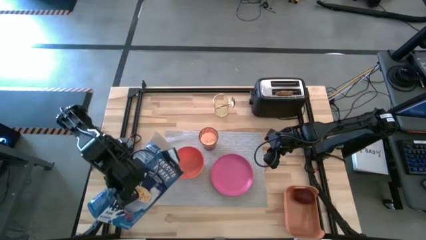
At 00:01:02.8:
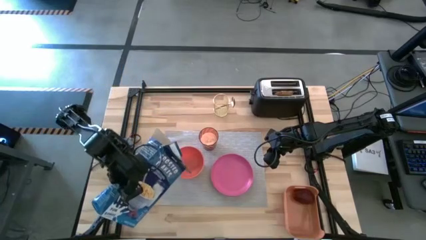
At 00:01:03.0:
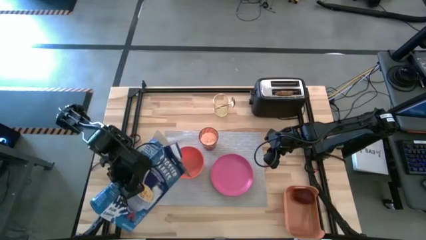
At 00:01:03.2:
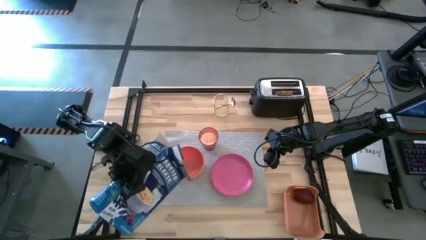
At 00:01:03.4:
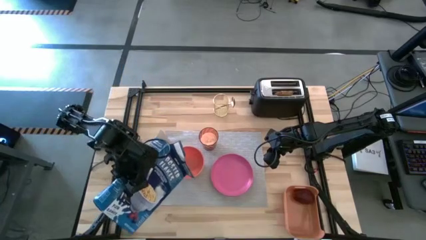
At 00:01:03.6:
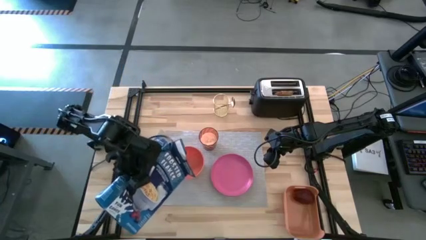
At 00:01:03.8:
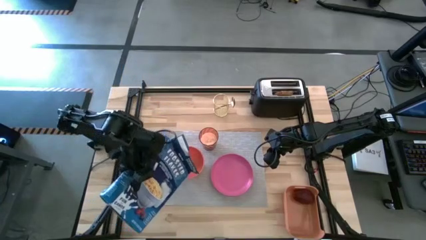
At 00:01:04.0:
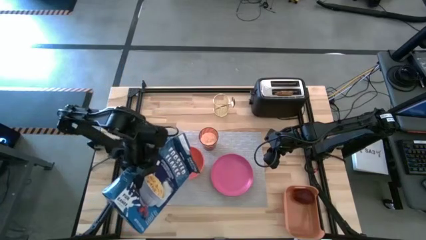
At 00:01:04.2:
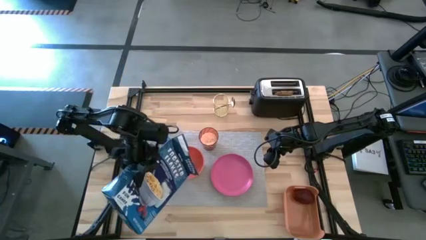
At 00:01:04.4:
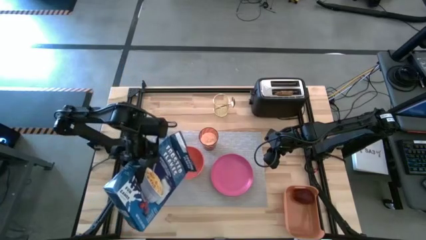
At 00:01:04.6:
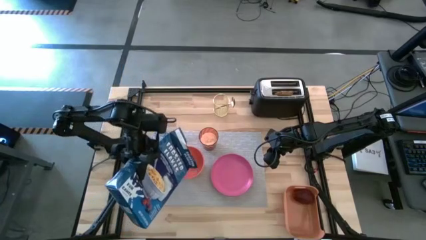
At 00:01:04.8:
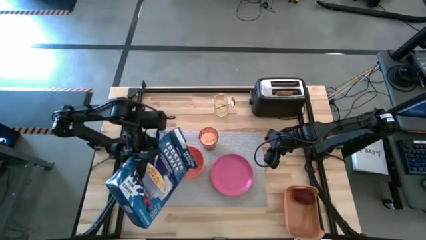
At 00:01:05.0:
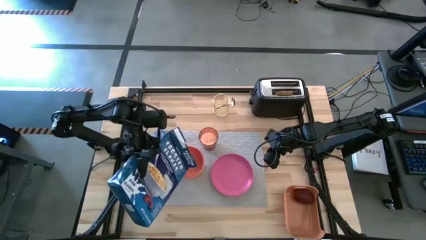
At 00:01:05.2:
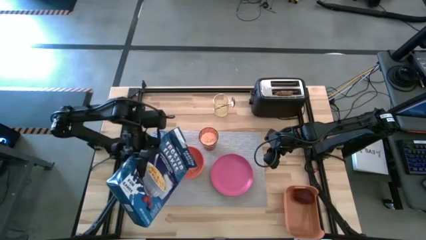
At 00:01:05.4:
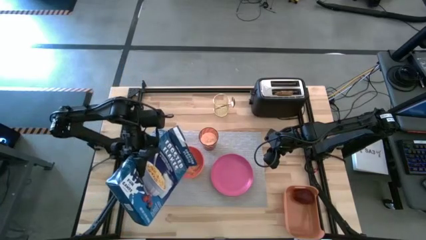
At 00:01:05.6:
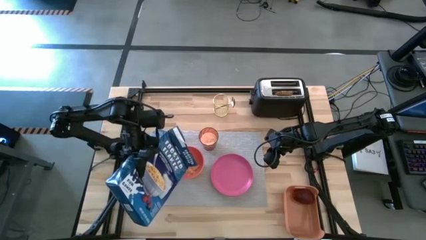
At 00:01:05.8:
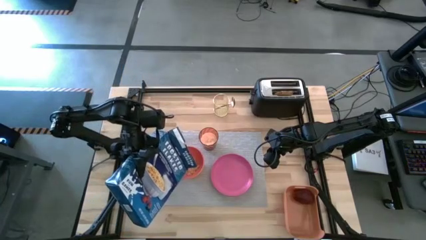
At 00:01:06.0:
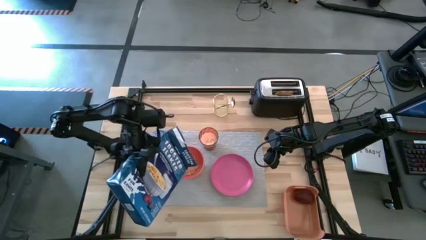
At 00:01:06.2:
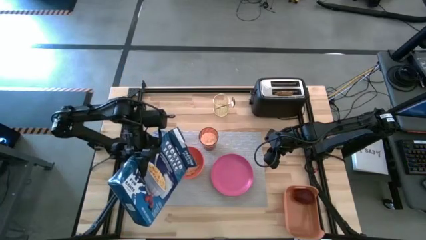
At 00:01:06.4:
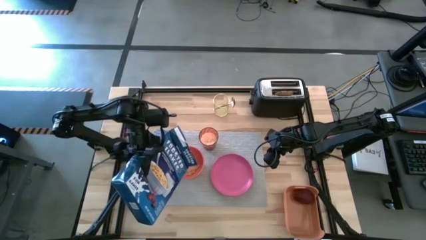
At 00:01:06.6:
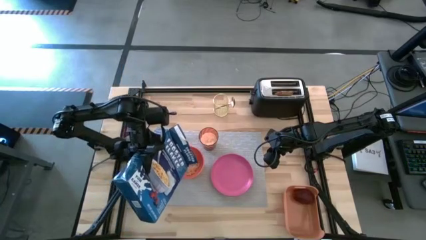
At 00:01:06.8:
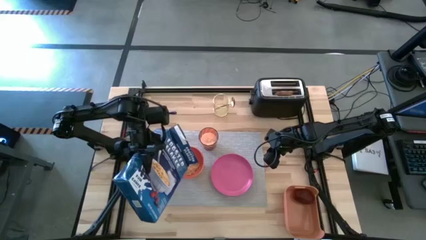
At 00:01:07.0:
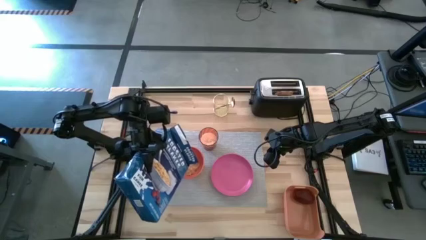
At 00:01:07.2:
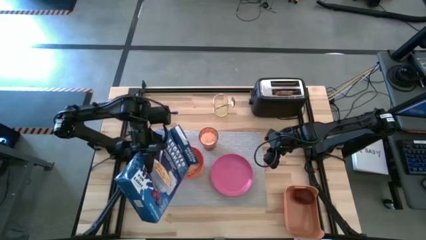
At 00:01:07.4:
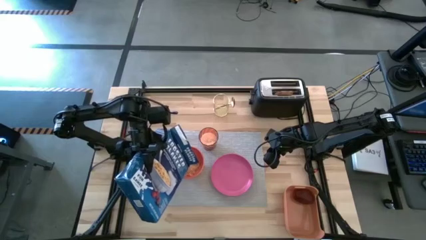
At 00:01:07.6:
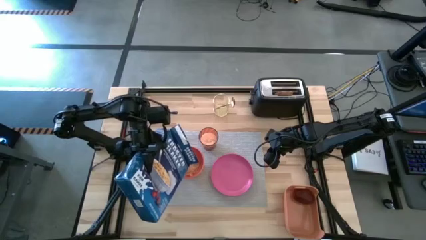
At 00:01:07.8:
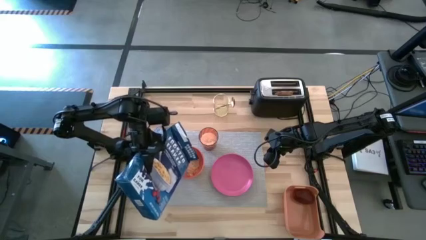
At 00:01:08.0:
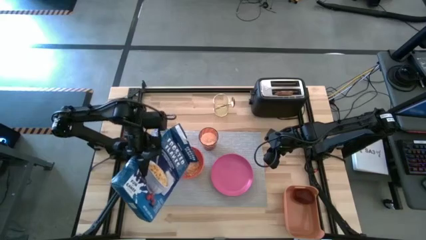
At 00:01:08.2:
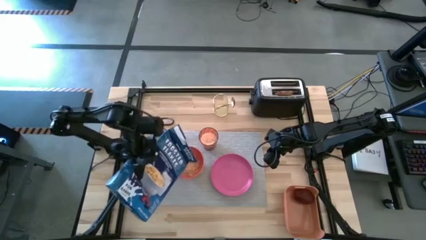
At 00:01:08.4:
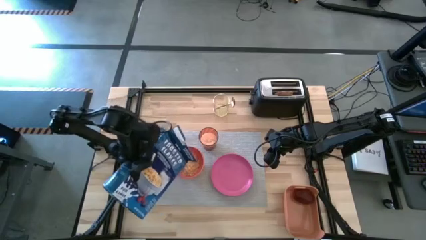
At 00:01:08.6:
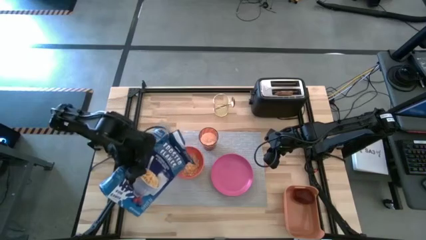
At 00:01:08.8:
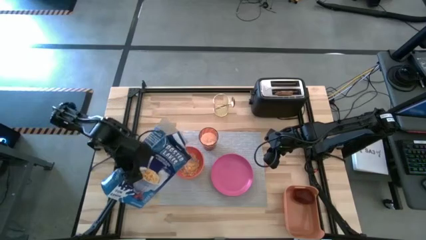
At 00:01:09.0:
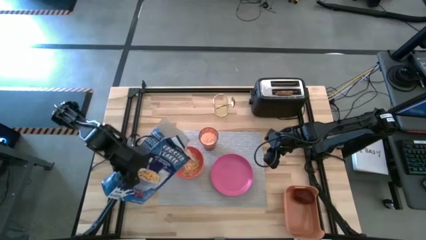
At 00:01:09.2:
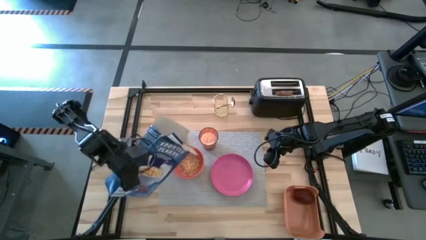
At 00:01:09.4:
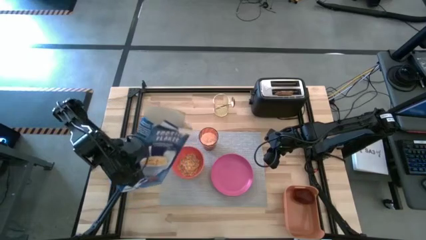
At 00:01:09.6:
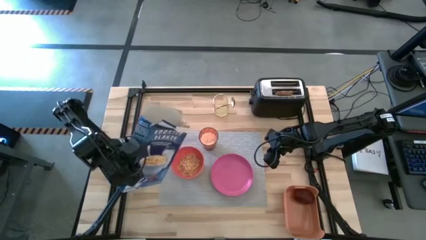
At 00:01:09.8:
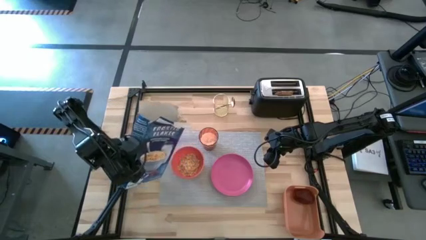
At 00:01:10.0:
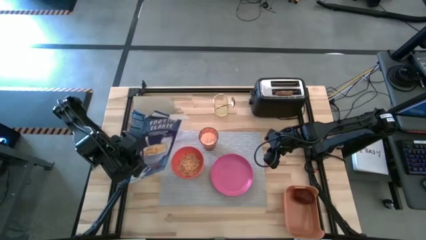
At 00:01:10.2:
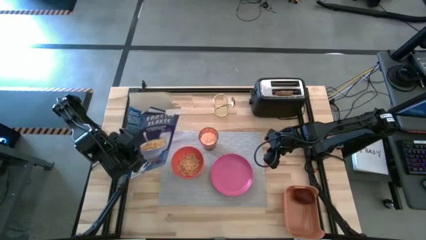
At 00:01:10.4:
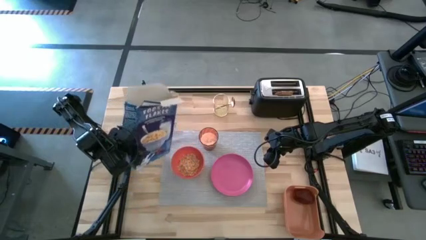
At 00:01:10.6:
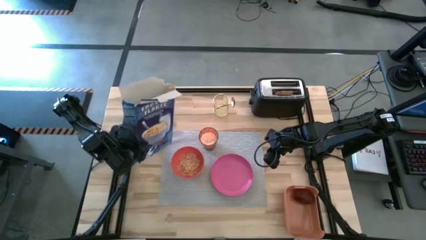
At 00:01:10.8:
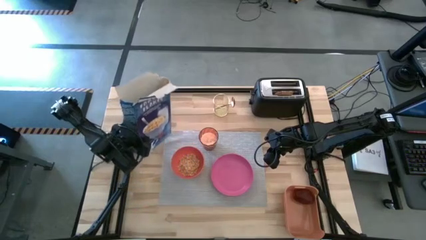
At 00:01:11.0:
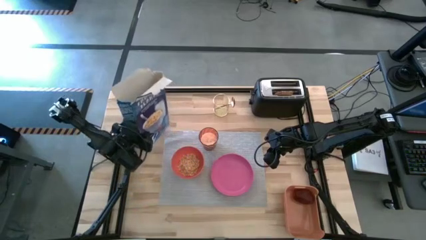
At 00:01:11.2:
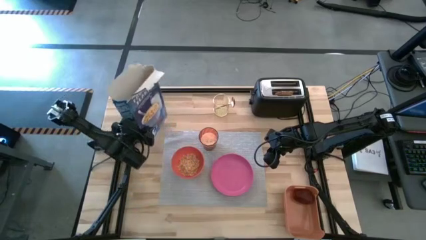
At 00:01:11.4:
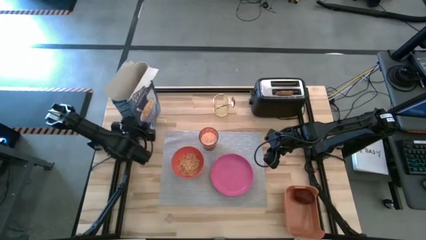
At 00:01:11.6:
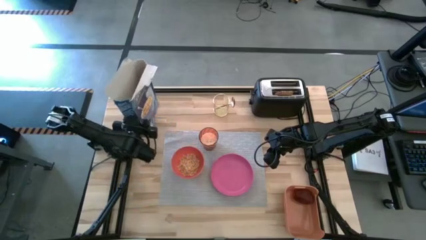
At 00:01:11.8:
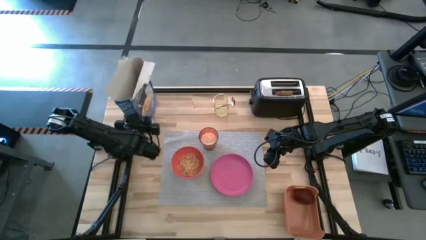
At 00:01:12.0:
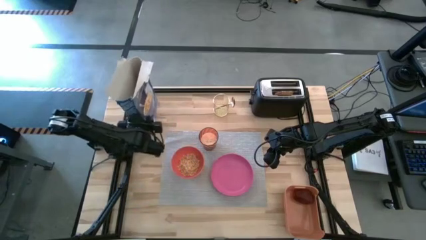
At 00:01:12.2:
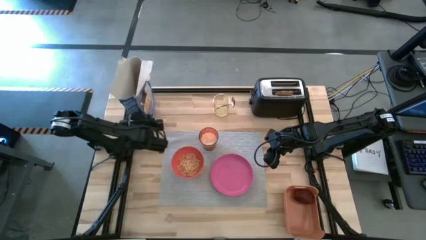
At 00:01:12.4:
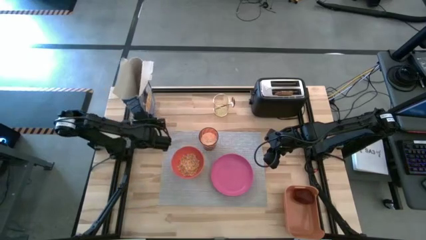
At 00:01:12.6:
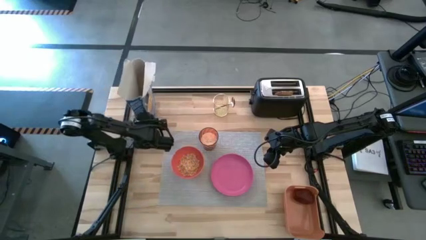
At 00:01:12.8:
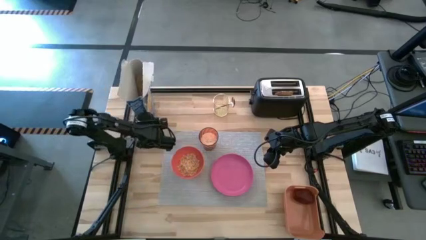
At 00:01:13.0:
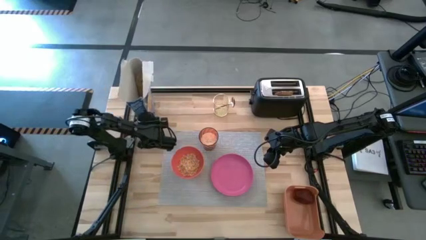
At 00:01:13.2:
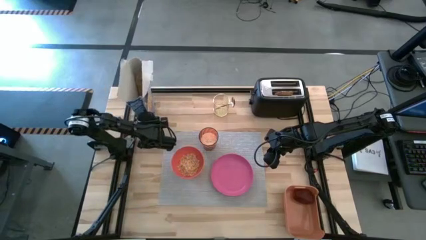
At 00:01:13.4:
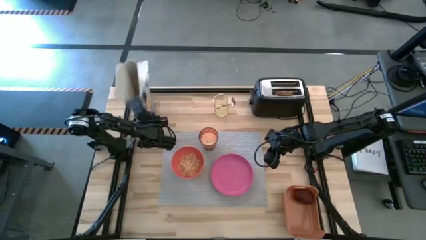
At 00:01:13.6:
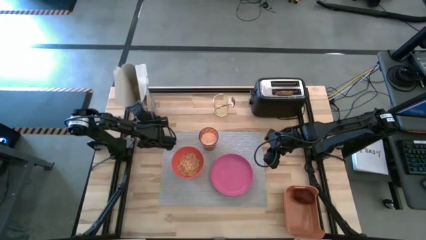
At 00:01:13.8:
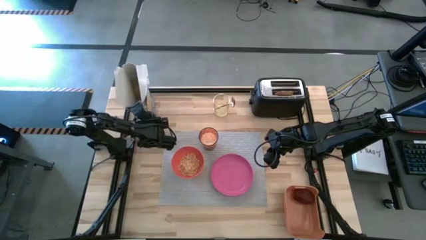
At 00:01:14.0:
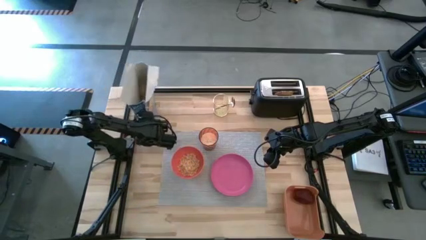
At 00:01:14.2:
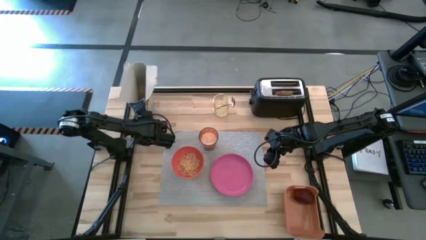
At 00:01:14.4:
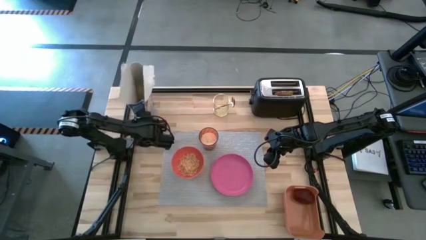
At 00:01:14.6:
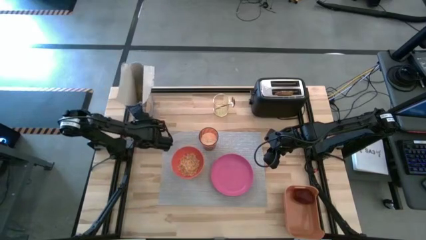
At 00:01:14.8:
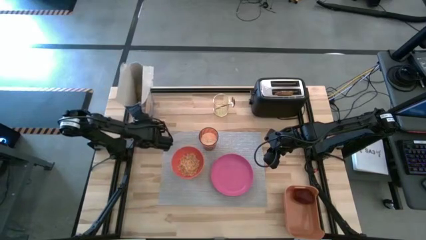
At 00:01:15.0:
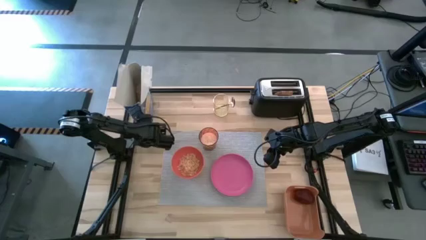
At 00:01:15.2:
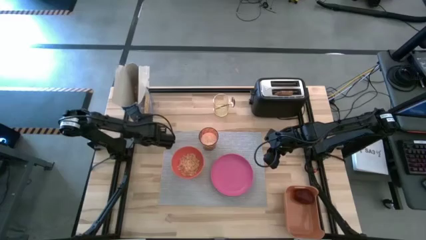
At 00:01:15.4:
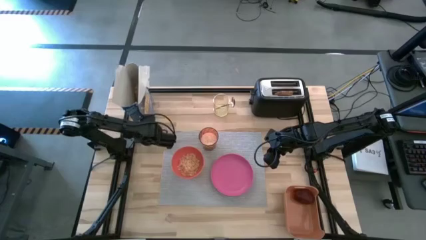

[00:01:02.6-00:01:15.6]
Task: Arrange a breakfast setting
Pour the blue cereal into the orange bowl
